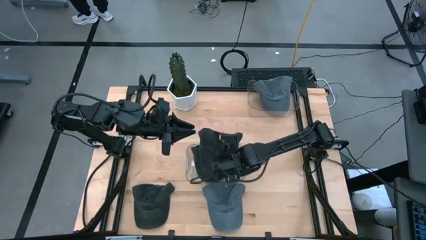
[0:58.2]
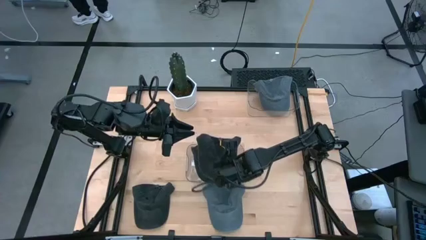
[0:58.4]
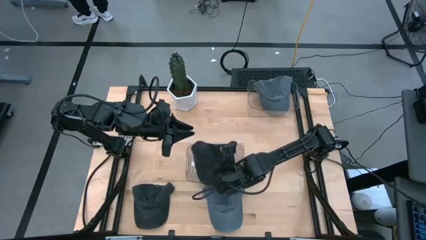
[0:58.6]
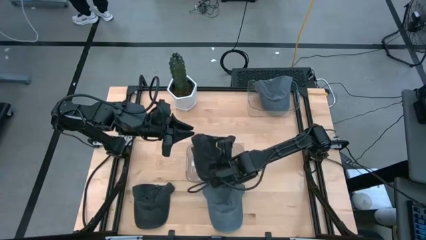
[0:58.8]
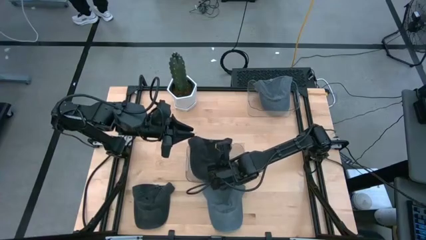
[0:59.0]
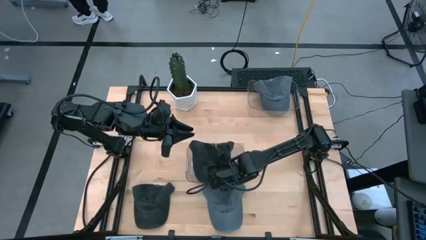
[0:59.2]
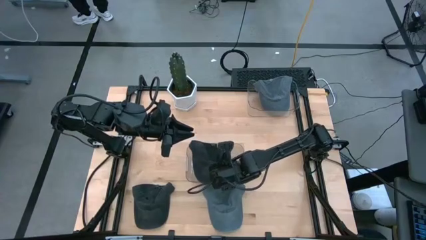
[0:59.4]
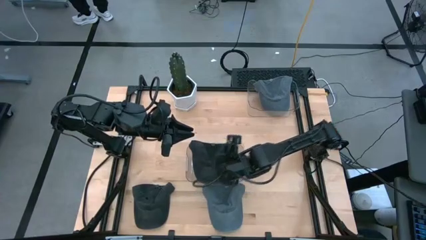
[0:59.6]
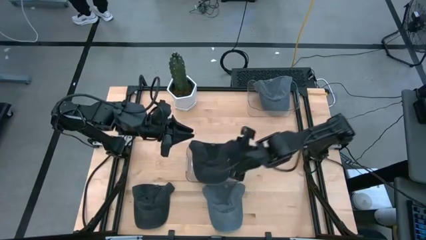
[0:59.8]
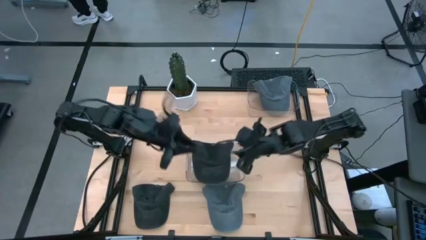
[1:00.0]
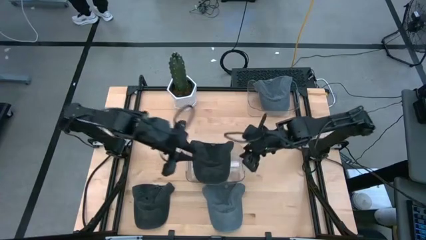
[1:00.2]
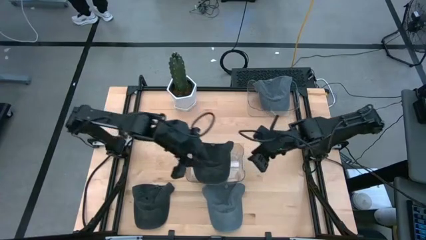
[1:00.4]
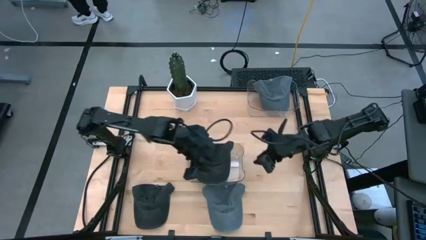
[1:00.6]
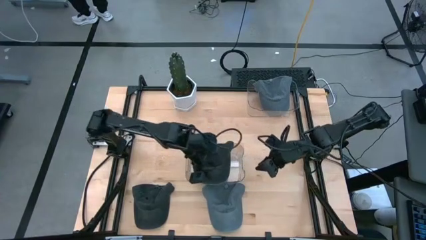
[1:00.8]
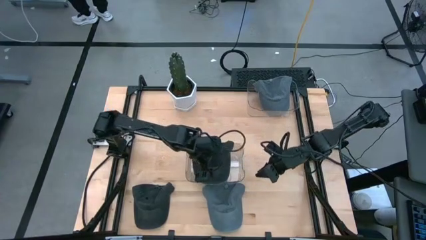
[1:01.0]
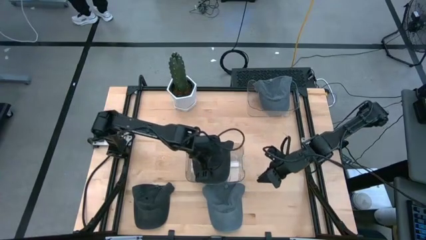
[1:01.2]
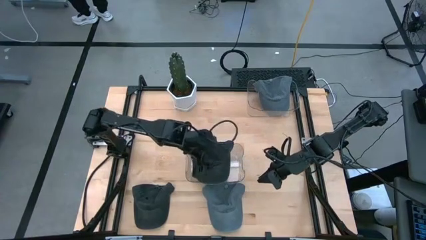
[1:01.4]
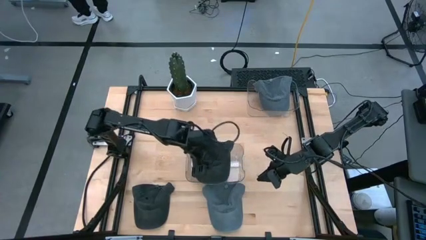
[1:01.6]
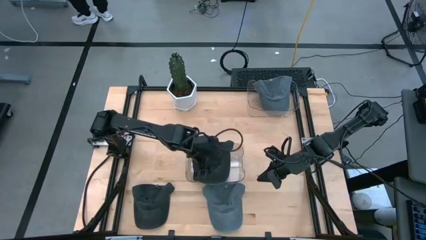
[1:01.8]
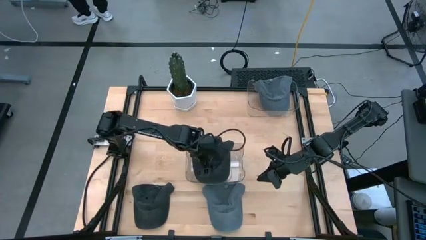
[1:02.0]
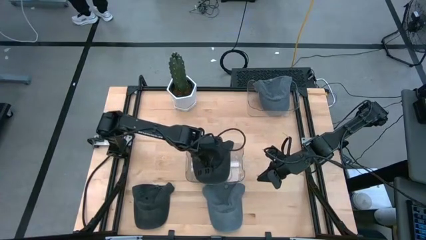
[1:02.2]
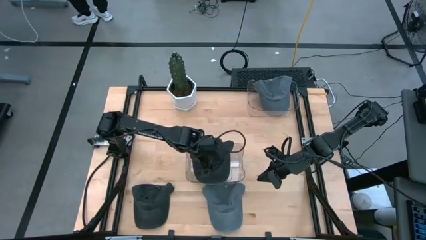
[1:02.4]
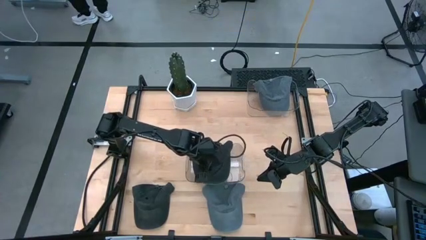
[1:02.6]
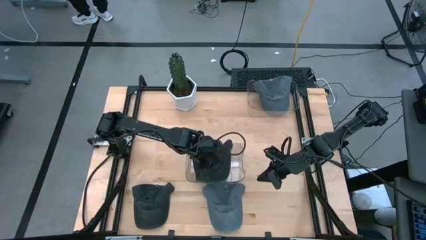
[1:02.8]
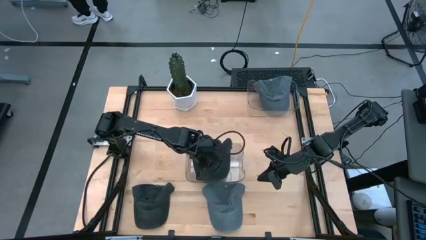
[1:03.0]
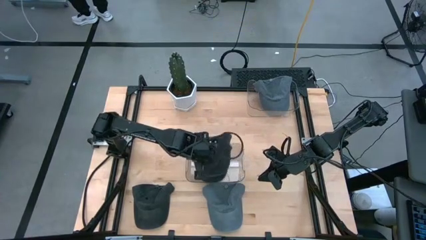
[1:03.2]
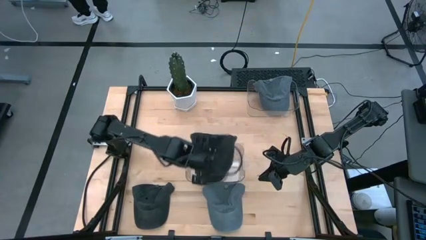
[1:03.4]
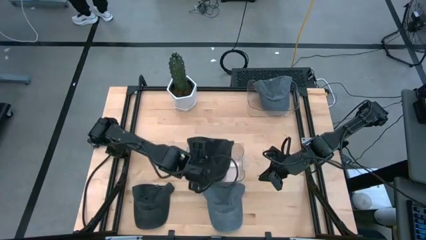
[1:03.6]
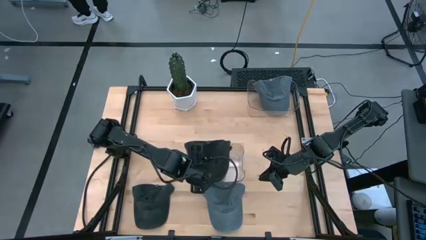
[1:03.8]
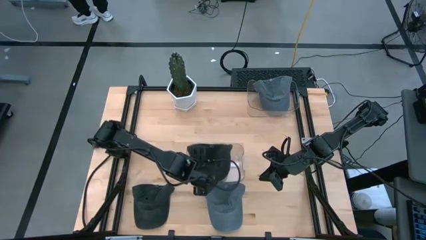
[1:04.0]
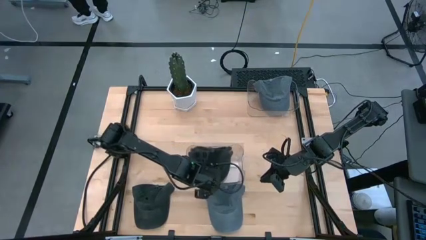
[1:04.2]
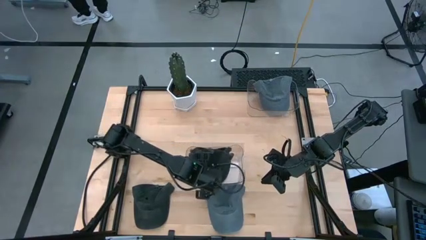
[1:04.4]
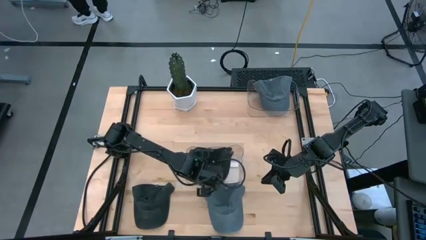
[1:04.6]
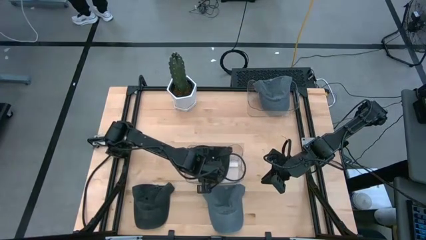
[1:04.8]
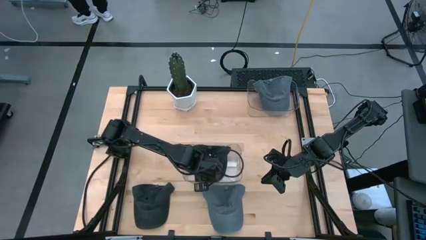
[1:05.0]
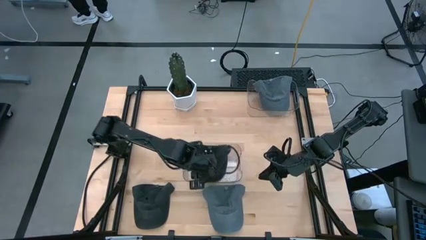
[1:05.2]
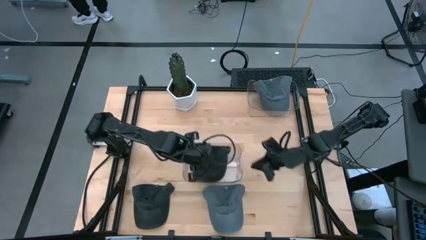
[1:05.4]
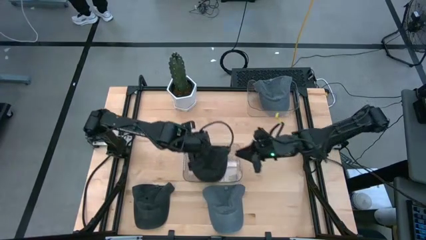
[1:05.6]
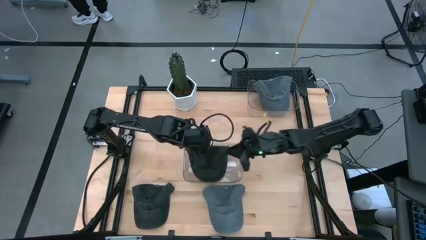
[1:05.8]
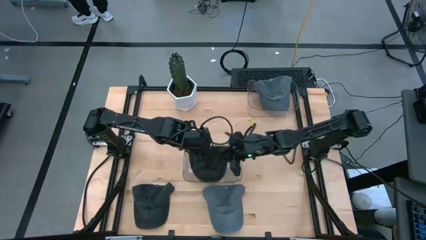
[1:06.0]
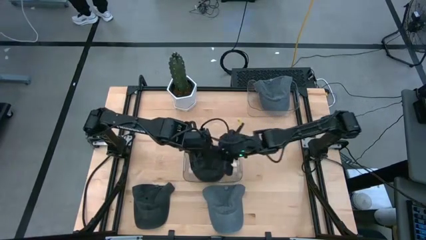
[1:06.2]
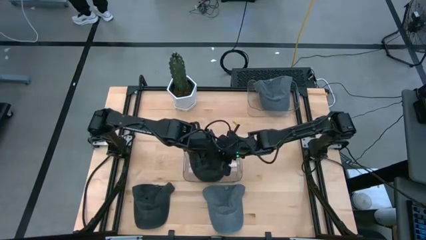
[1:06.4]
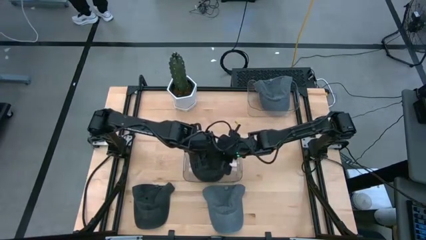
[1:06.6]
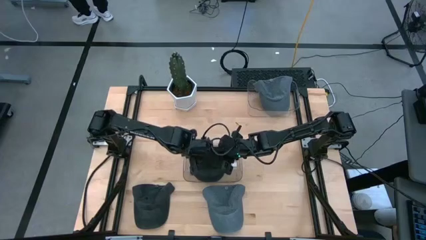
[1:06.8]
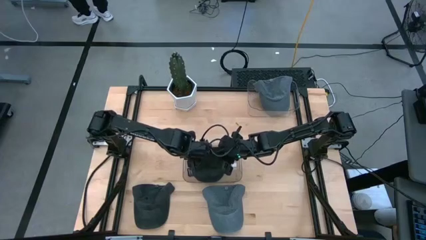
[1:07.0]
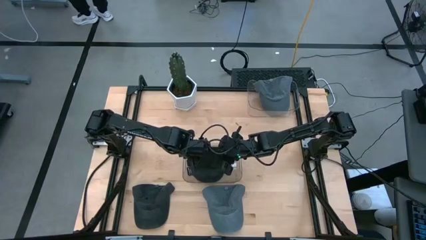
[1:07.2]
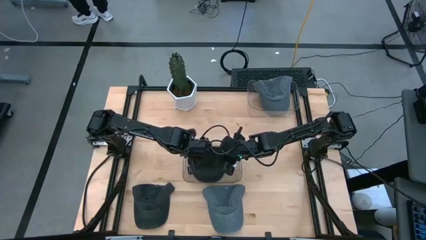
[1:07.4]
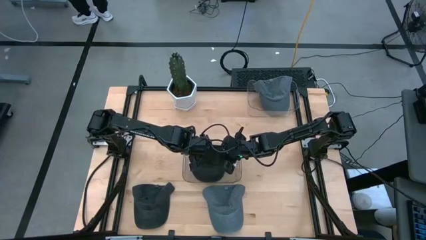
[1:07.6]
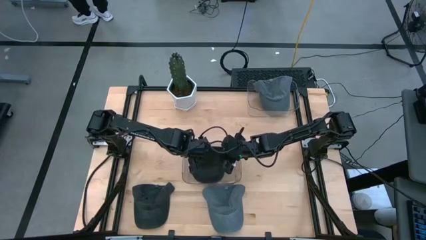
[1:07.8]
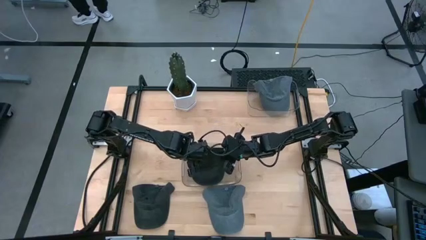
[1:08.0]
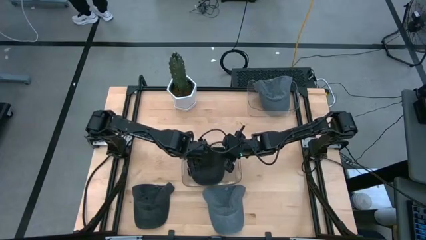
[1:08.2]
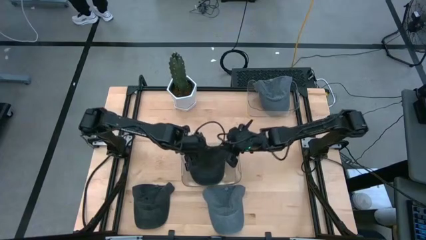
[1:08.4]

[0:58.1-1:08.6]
Task: Pick & Place hat
Put the right black cap into the bottom transparent bin

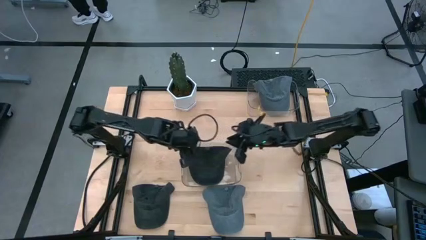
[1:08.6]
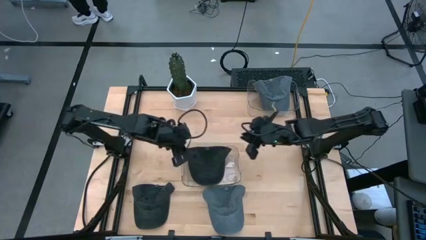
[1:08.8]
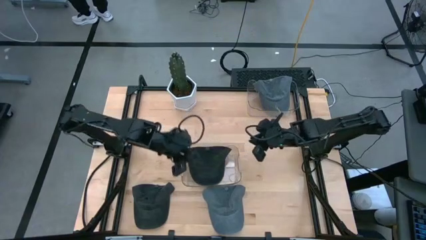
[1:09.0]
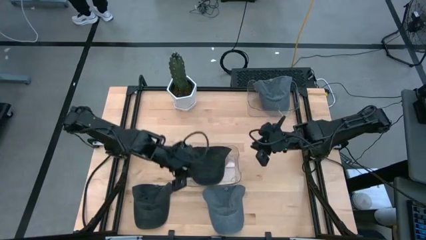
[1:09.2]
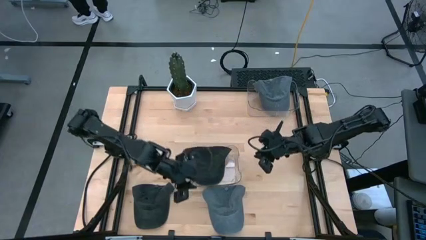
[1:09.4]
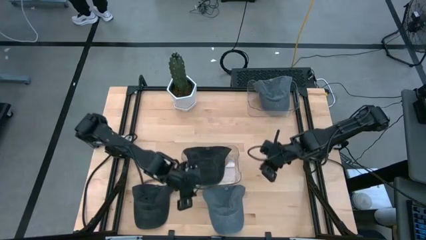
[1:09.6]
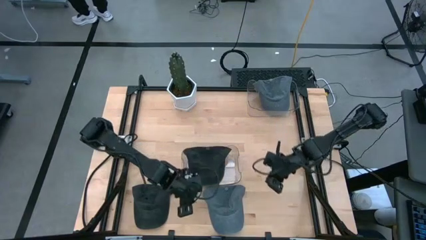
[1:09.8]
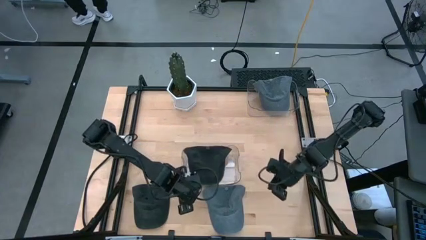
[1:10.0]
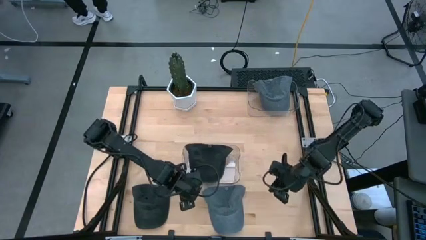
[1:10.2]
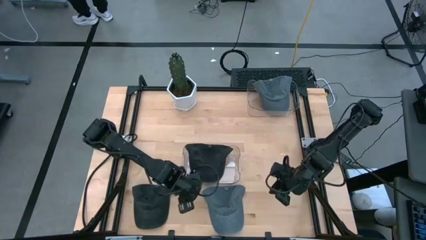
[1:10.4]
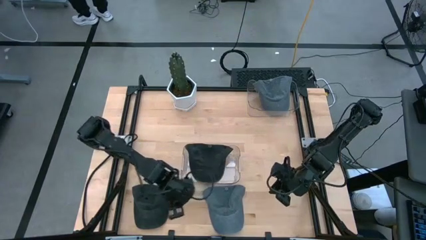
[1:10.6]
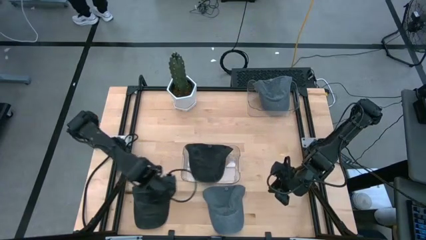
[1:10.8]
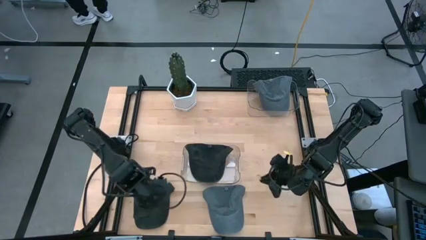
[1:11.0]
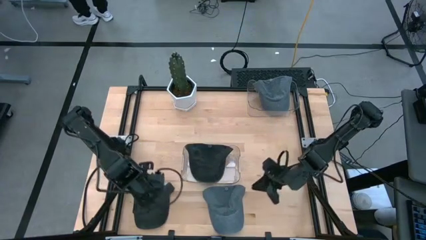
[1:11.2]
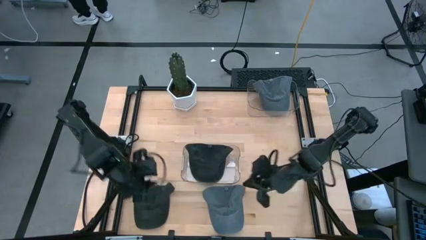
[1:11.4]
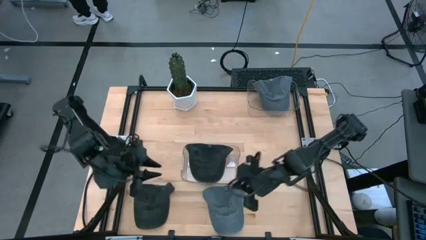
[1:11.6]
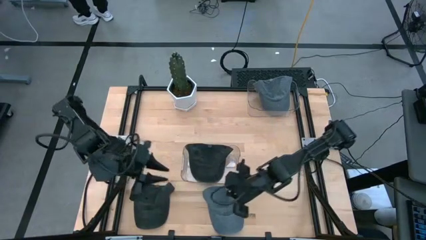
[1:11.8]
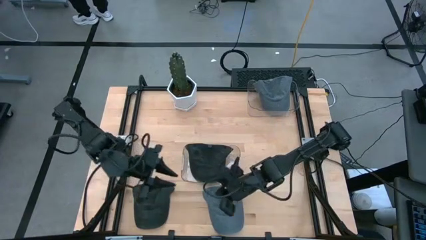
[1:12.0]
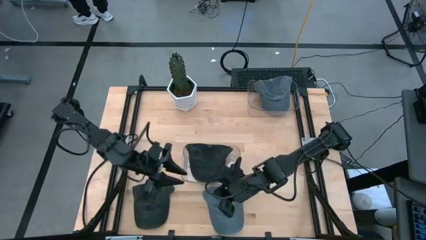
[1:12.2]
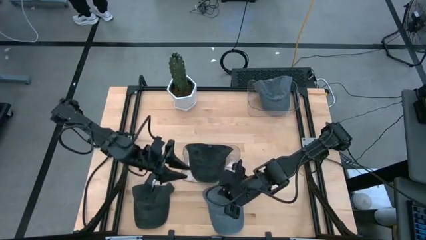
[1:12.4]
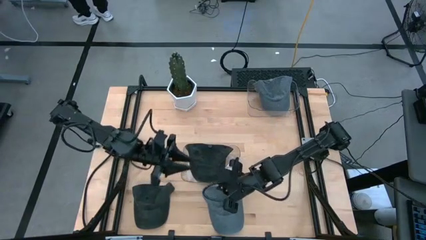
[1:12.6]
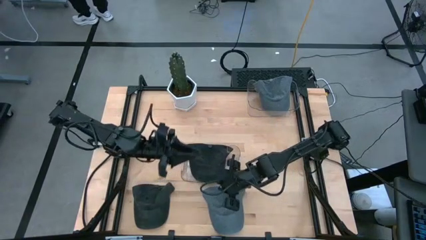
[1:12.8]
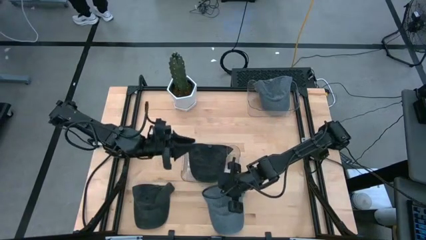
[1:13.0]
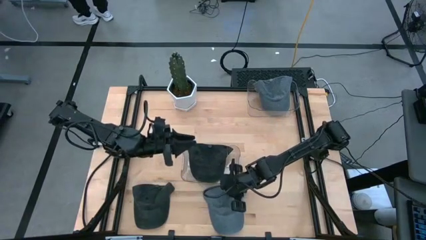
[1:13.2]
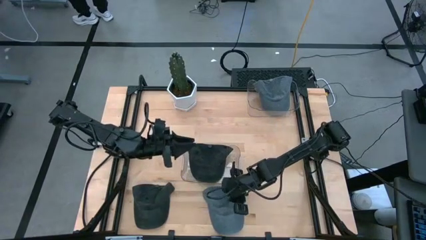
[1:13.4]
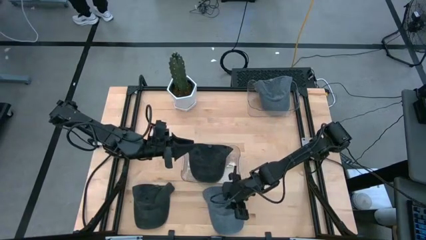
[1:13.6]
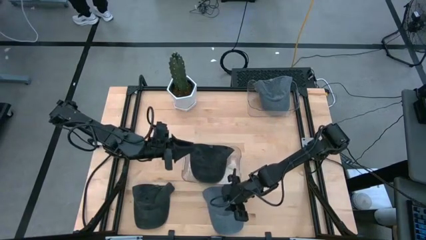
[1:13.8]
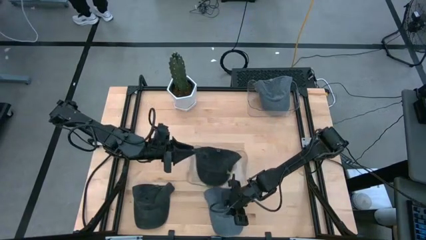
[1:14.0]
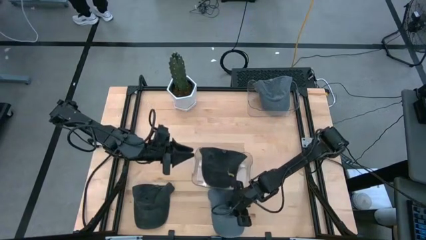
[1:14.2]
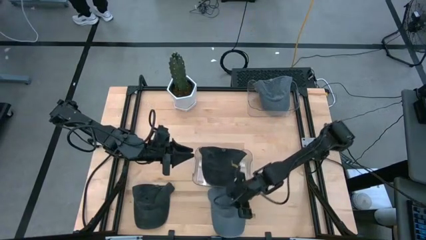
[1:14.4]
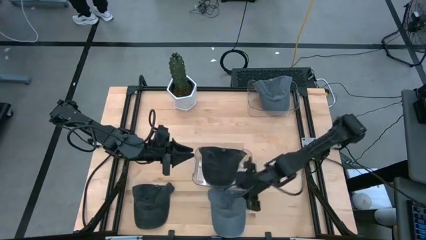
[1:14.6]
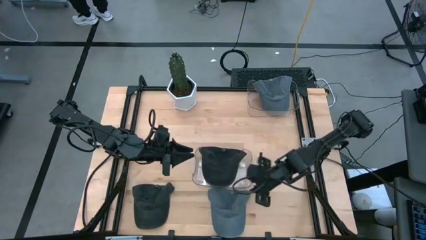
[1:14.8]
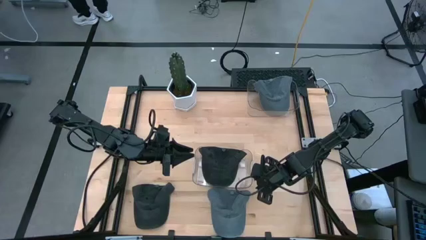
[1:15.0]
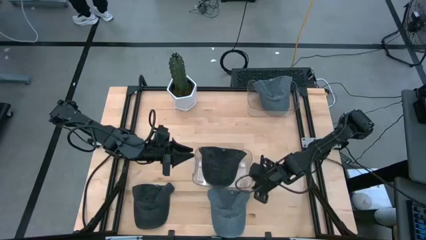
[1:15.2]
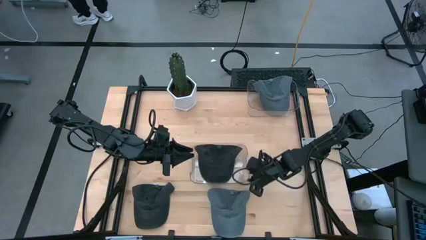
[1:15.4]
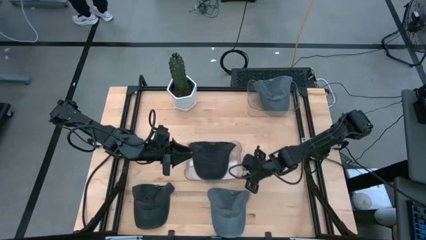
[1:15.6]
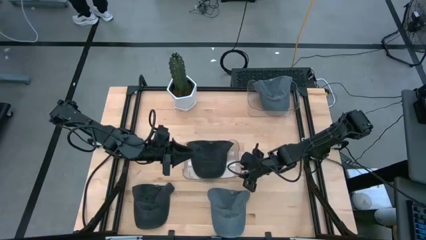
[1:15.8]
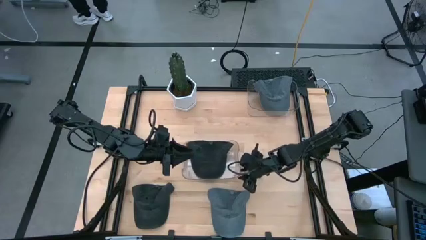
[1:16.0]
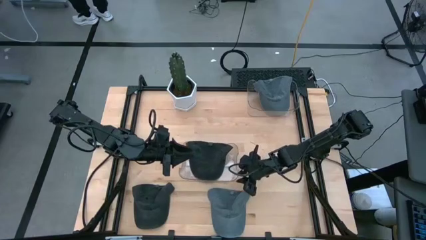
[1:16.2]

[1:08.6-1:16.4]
Adjust the bottom transparent bin on the table
